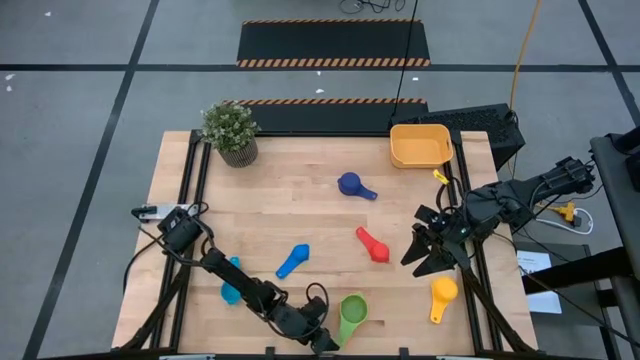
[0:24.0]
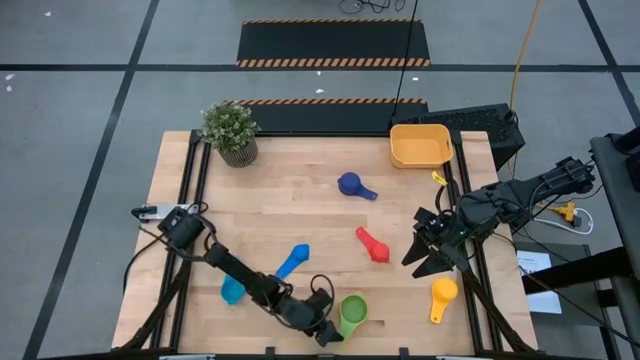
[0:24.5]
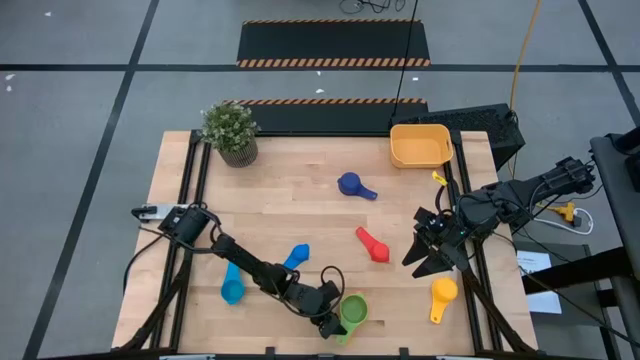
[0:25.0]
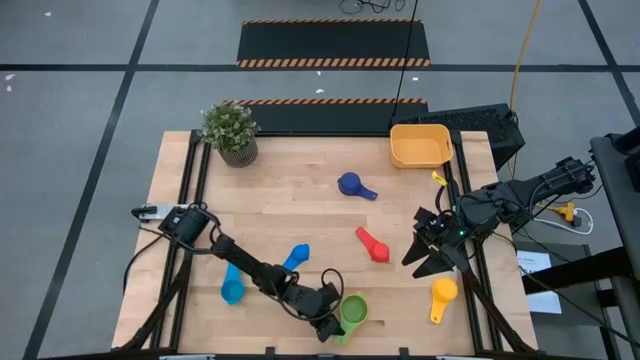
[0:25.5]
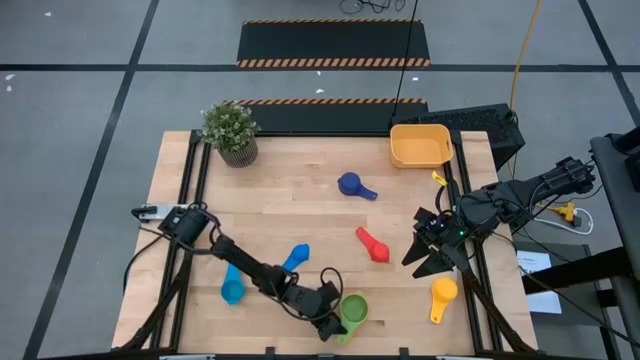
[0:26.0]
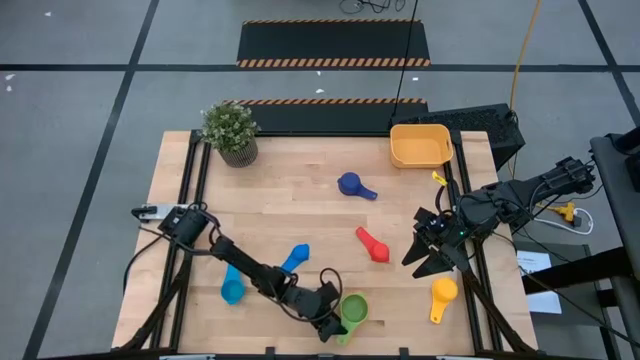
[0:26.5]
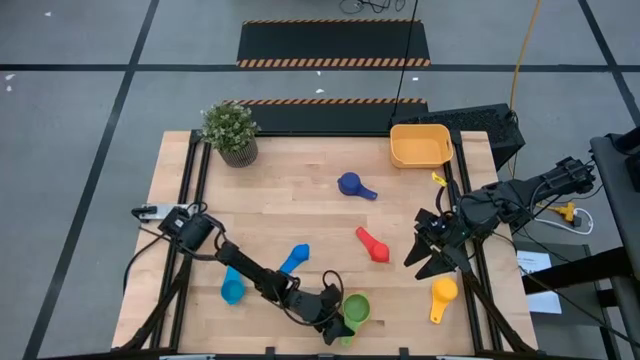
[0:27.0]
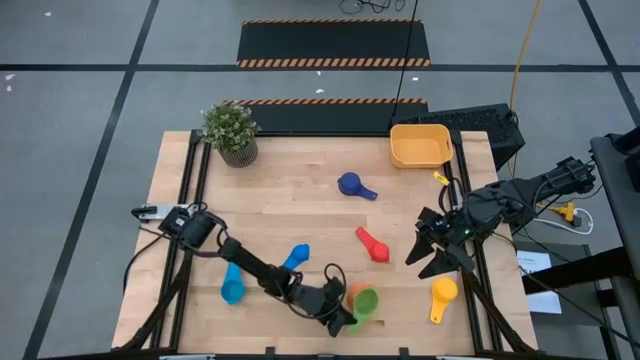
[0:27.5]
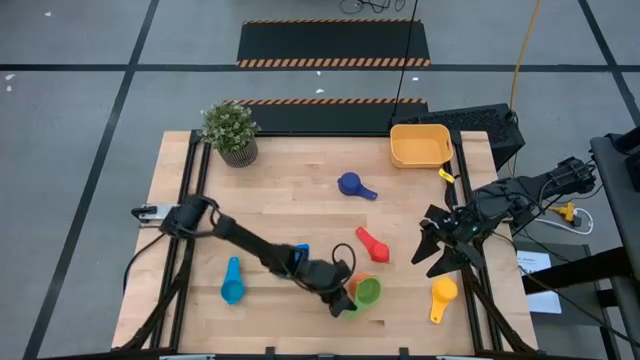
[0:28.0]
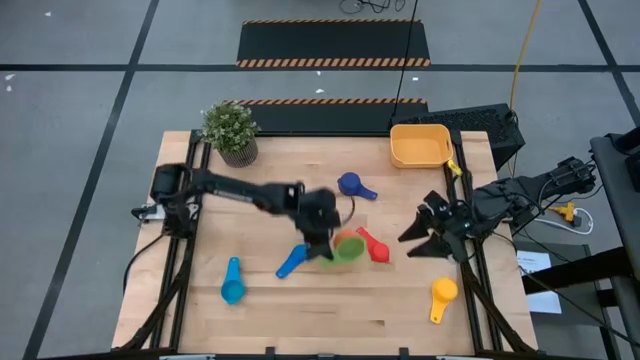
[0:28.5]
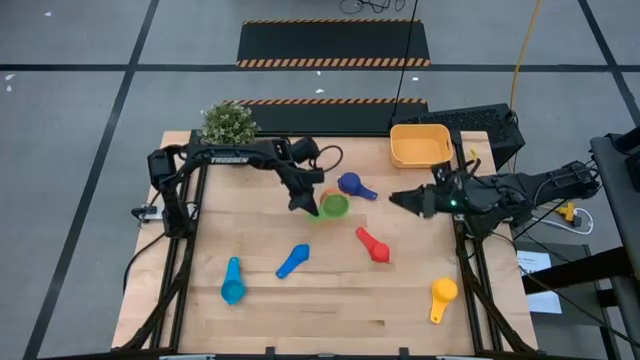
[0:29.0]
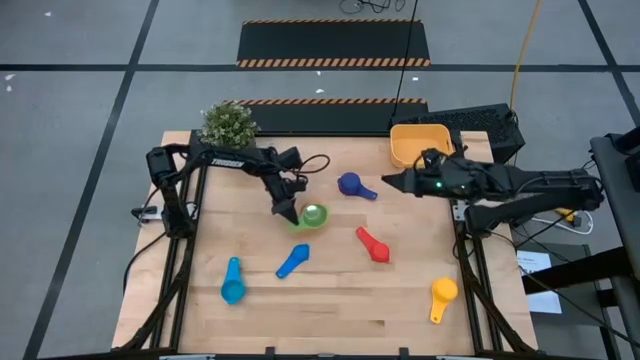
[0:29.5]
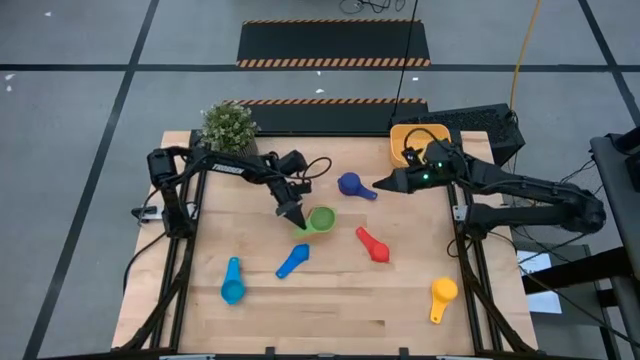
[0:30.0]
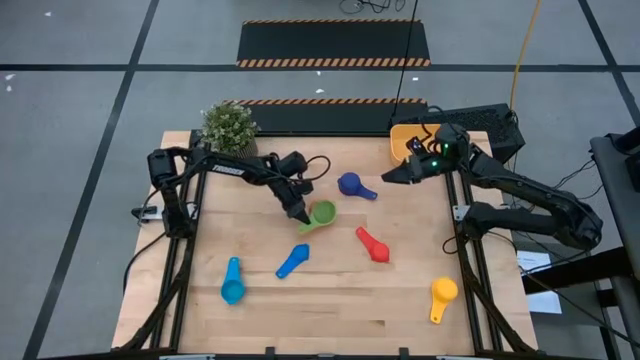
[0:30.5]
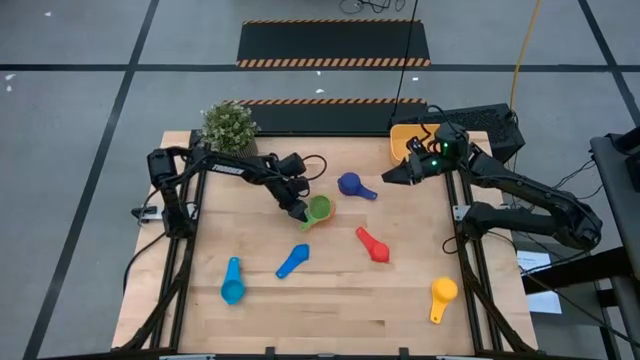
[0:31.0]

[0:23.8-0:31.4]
Task: Nest measuring cups in basket
Move the stacked measuring cups to the center of the table

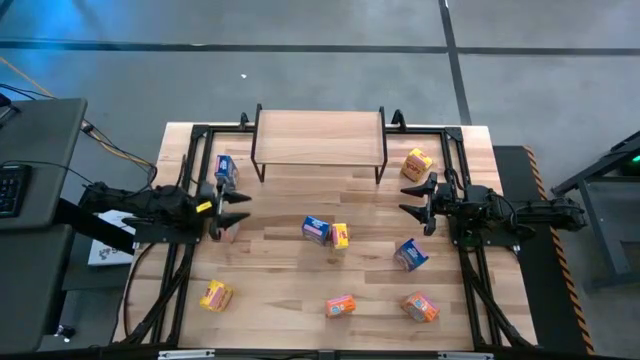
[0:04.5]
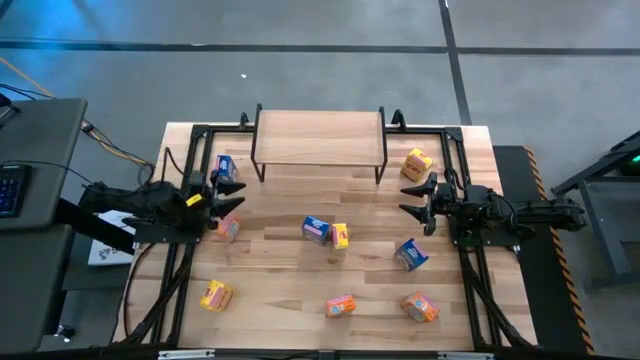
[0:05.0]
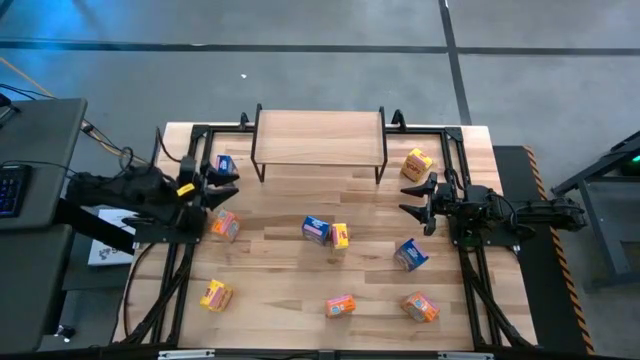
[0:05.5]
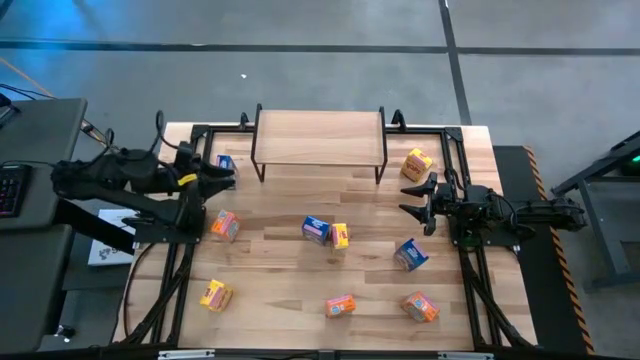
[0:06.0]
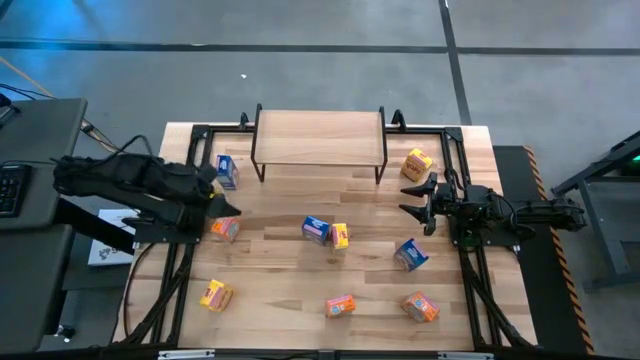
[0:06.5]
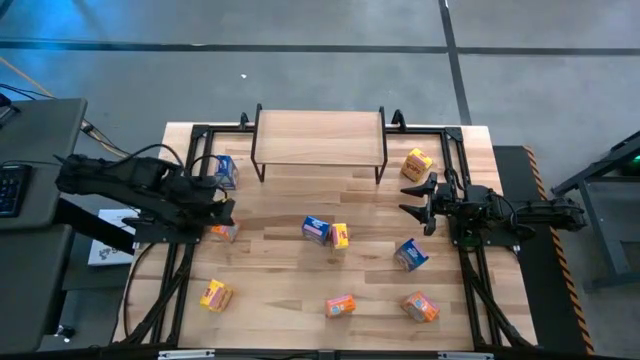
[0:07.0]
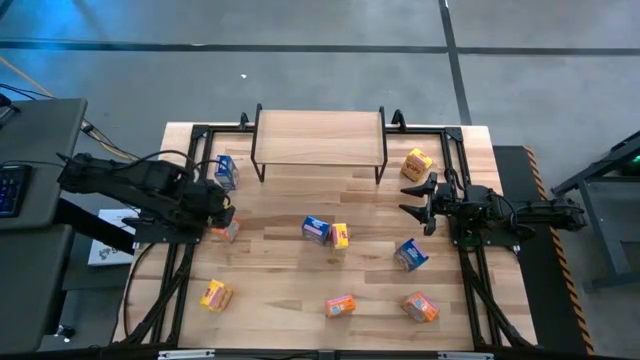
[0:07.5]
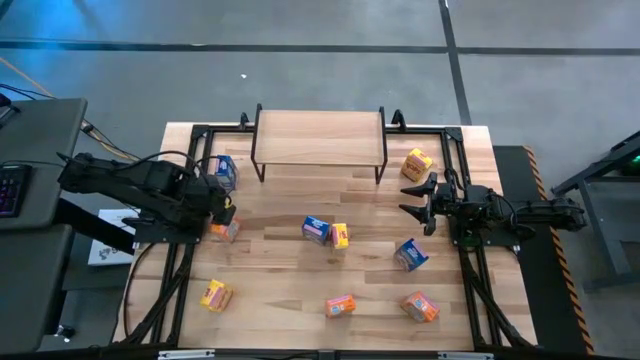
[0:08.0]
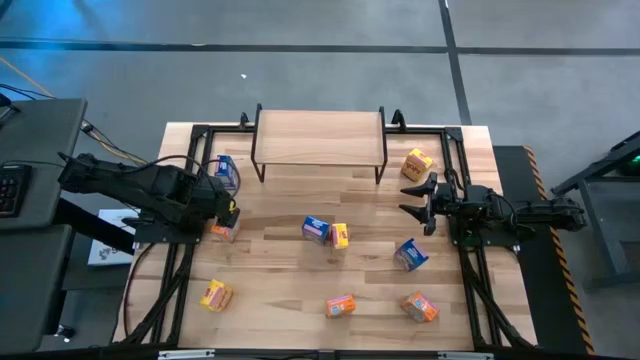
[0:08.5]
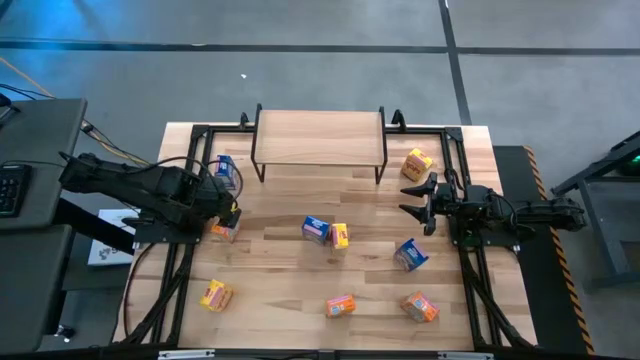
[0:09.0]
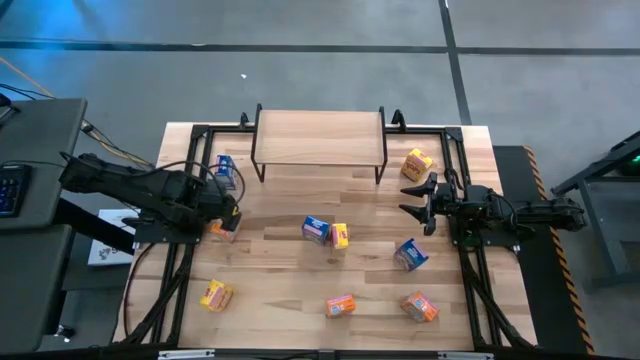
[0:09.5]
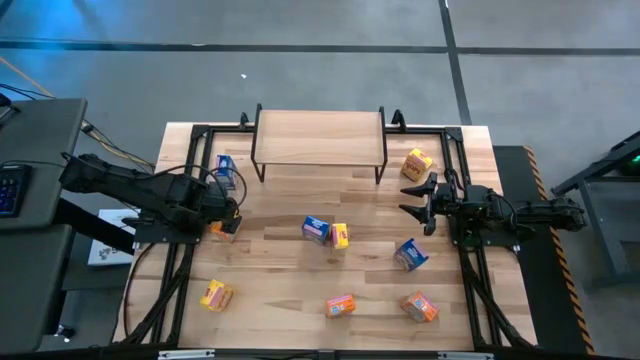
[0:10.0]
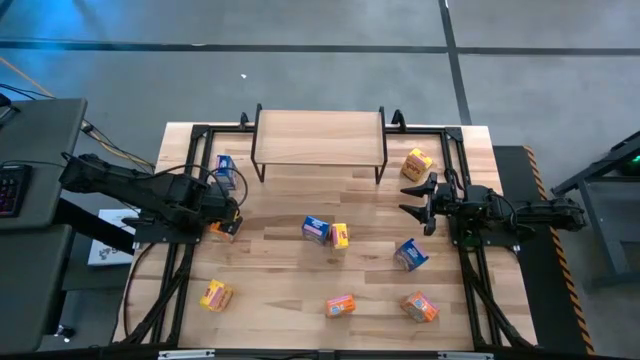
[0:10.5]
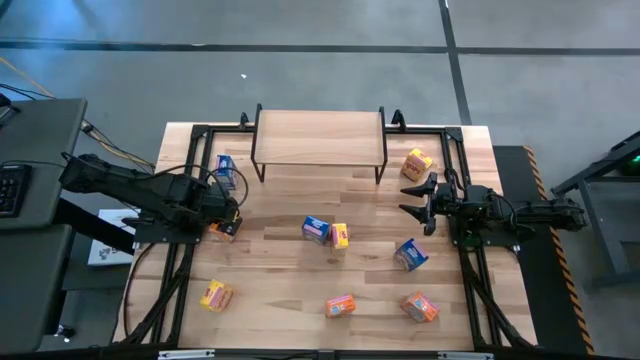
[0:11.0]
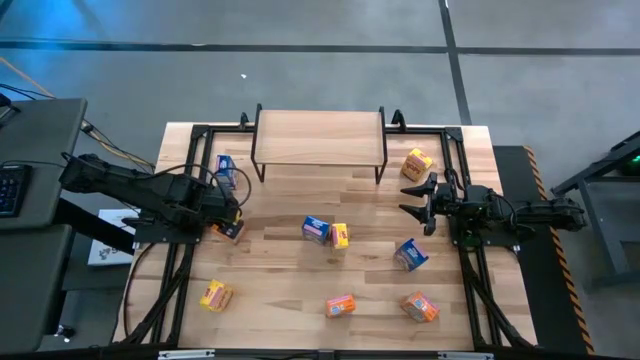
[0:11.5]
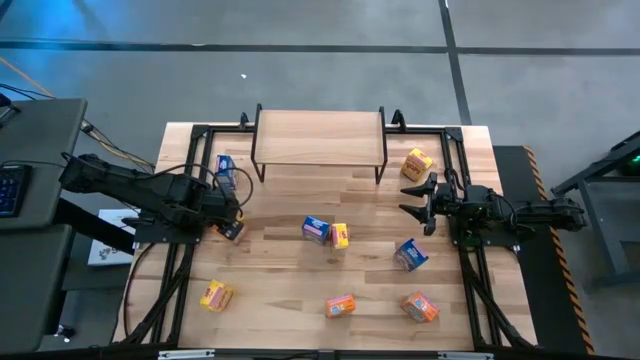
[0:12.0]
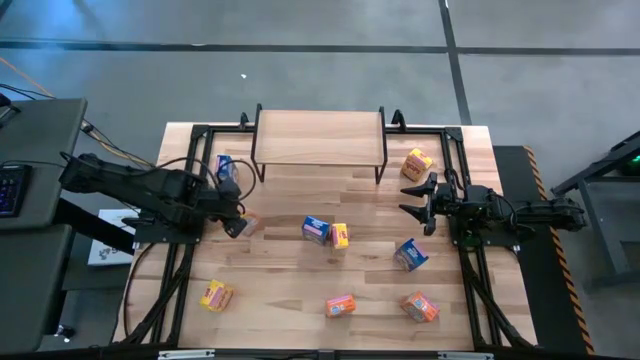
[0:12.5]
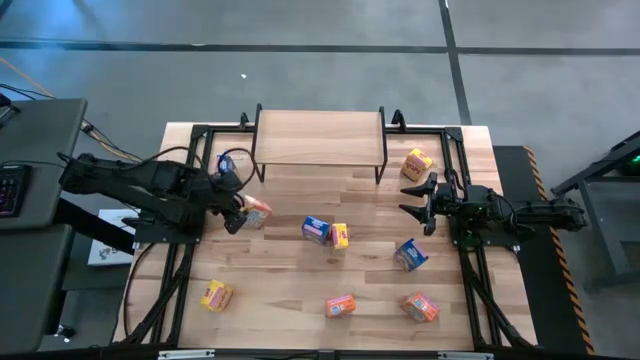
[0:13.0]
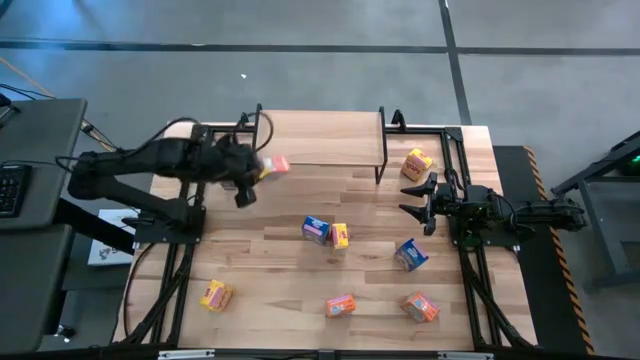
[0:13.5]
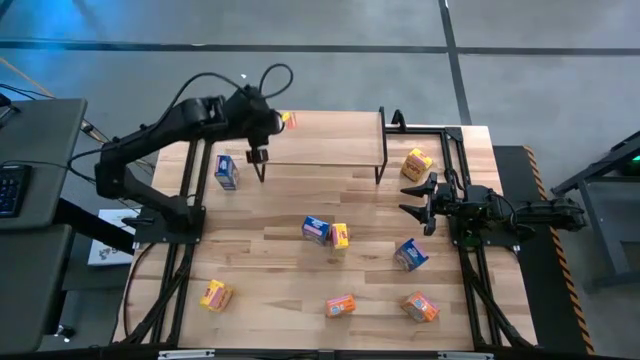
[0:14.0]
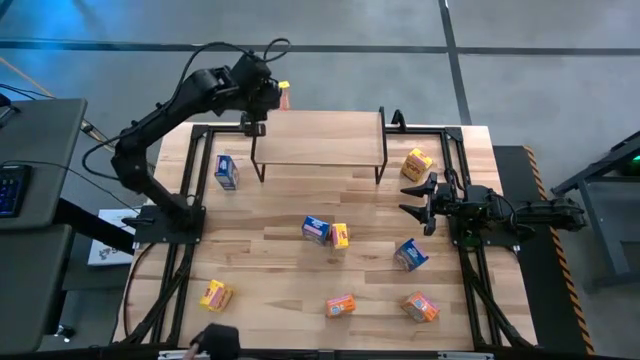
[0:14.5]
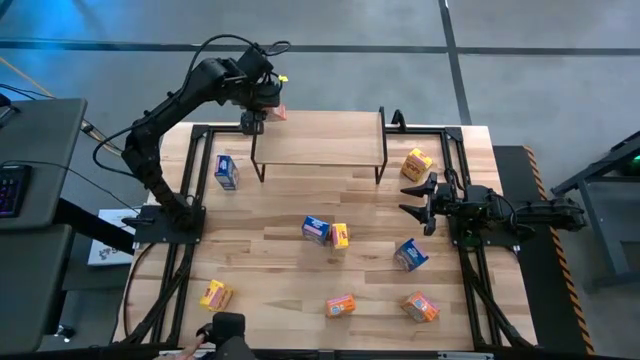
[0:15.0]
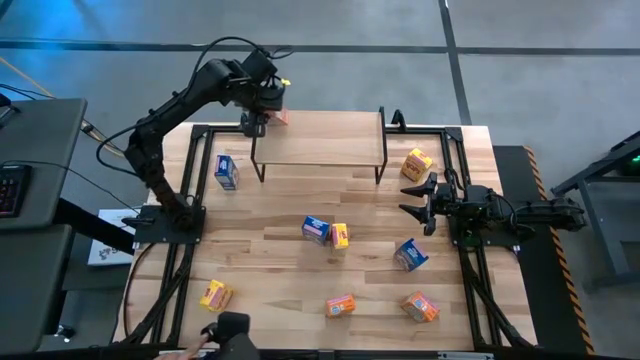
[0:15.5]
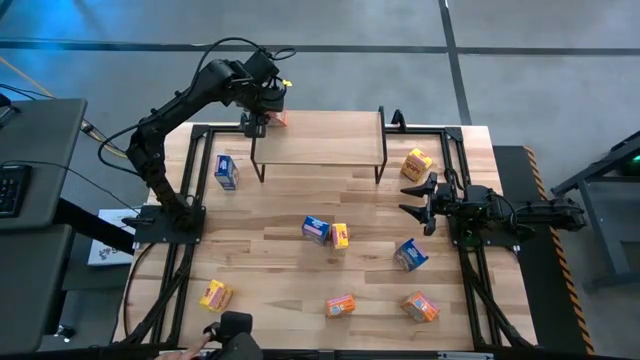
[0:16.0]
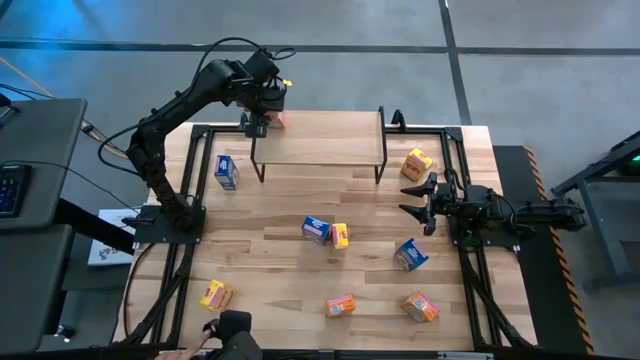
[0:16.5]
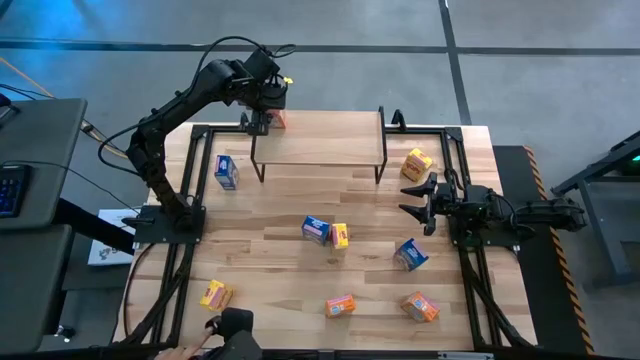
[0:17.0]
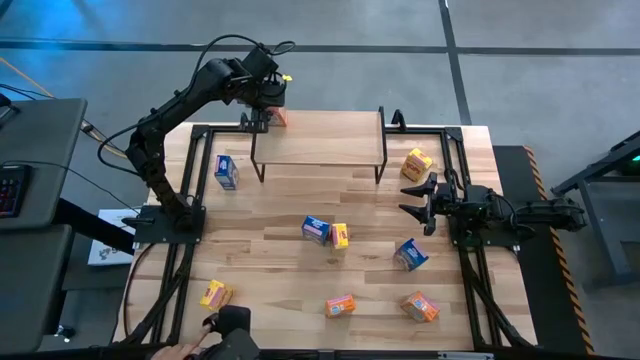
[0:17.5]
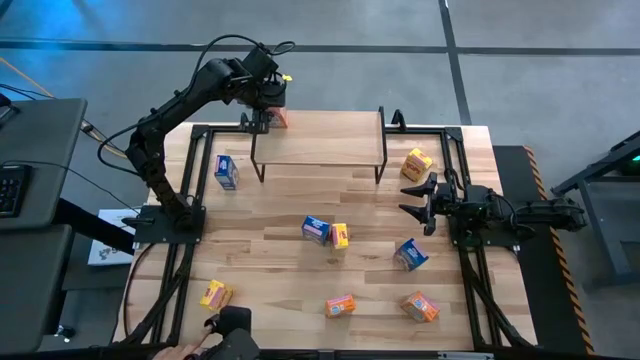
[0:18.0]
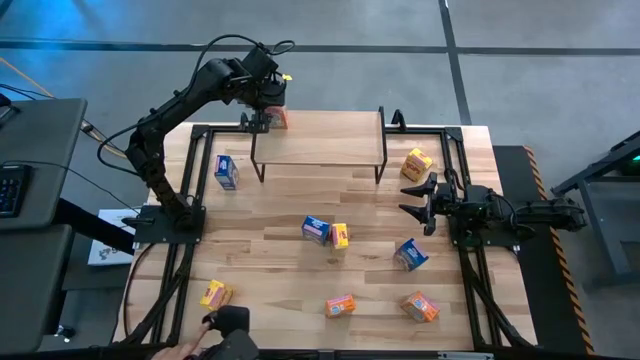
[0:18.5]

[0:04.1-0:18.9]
Task: Stack cereal on shelf
Put the top left orange cereal box on the shelf
